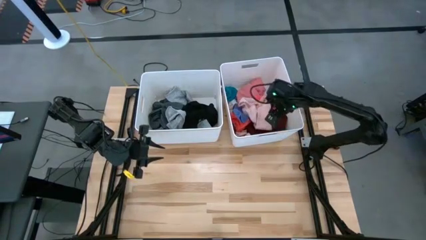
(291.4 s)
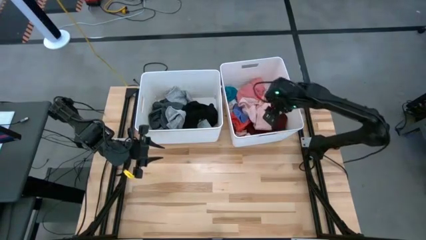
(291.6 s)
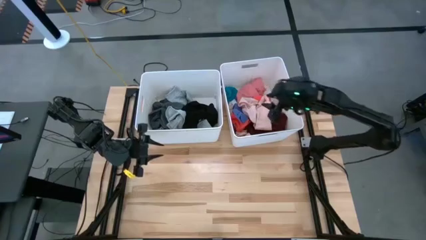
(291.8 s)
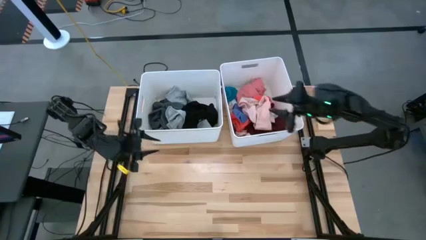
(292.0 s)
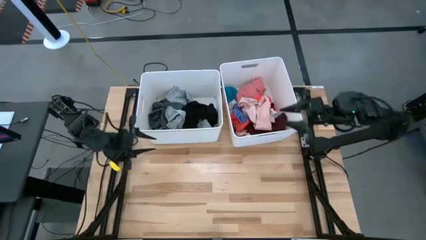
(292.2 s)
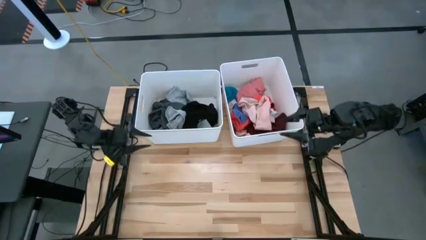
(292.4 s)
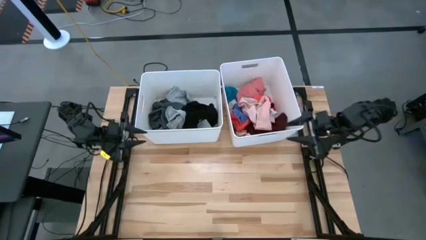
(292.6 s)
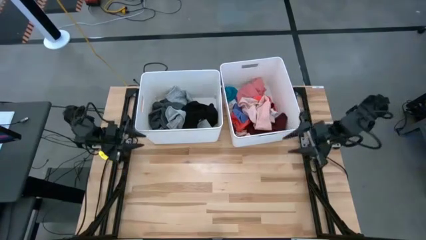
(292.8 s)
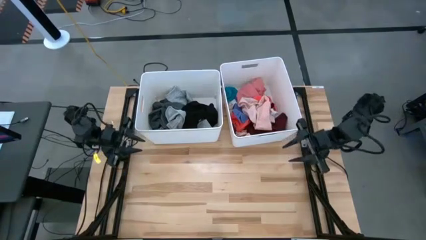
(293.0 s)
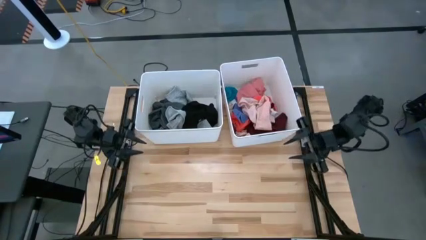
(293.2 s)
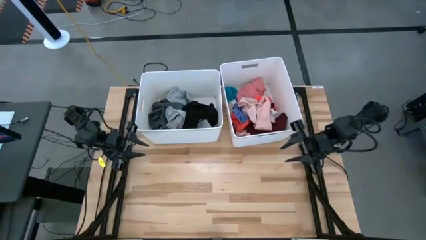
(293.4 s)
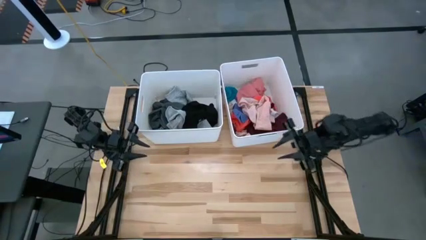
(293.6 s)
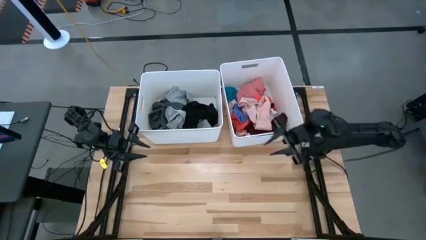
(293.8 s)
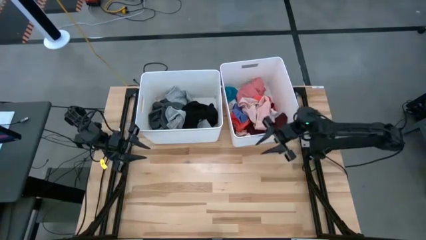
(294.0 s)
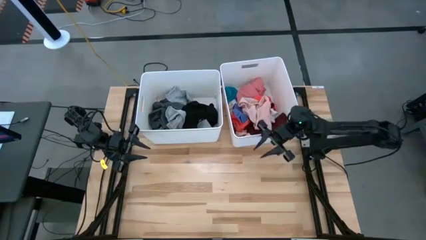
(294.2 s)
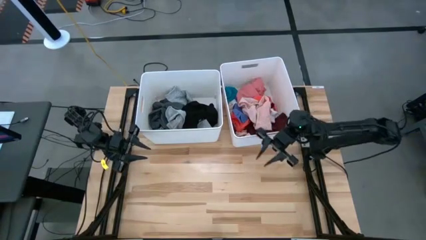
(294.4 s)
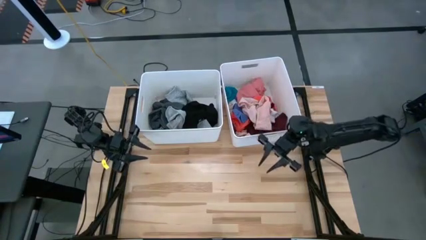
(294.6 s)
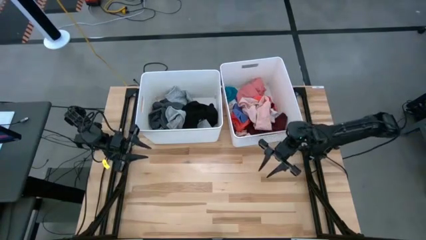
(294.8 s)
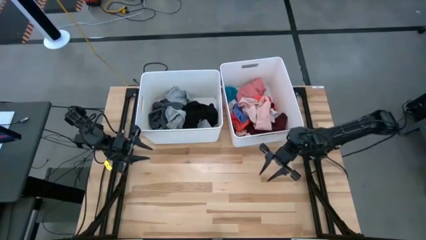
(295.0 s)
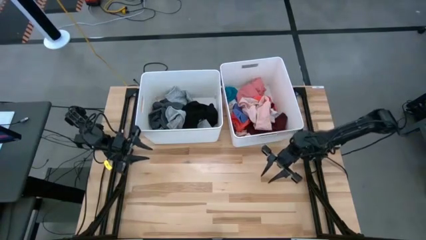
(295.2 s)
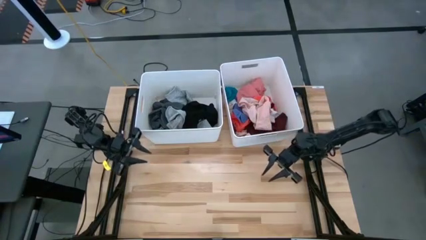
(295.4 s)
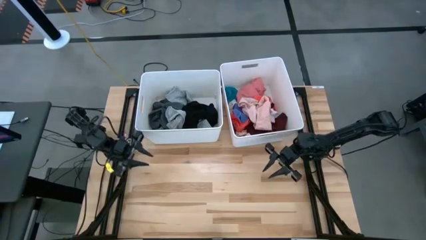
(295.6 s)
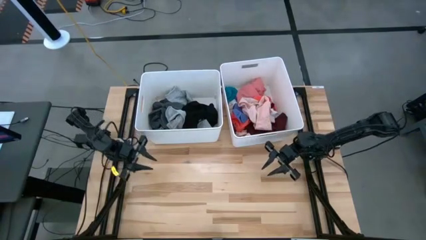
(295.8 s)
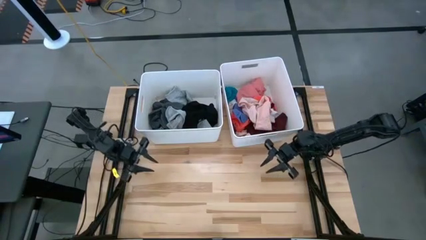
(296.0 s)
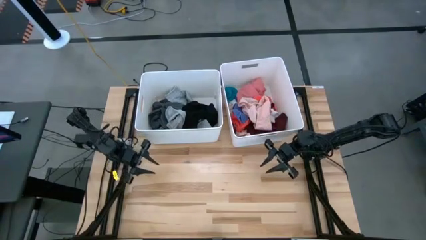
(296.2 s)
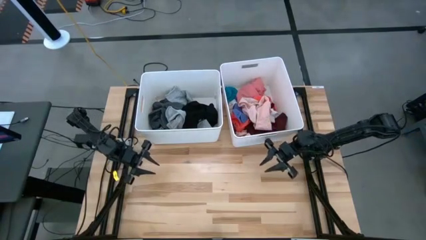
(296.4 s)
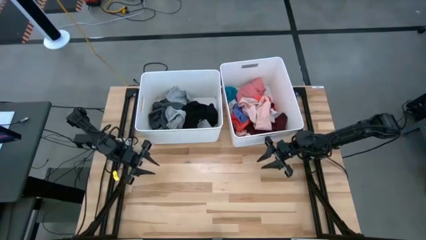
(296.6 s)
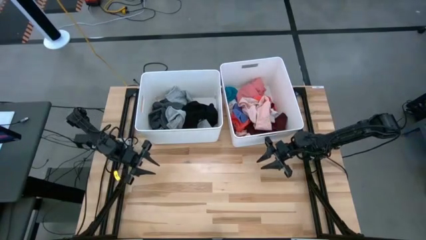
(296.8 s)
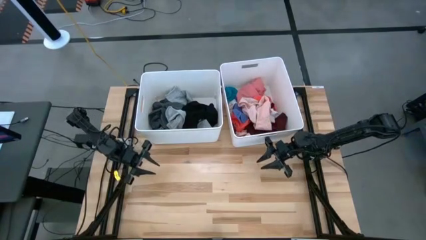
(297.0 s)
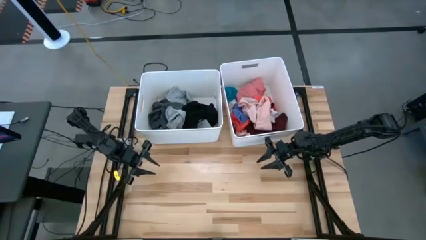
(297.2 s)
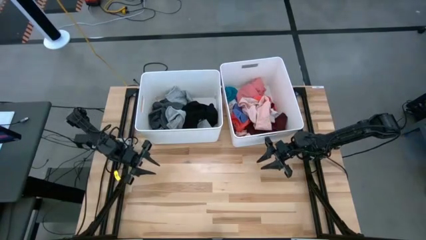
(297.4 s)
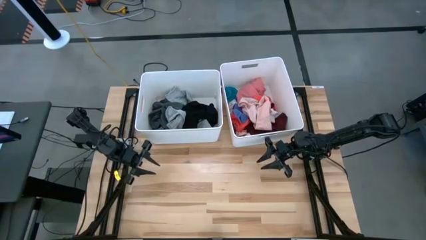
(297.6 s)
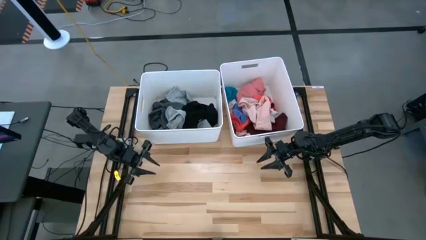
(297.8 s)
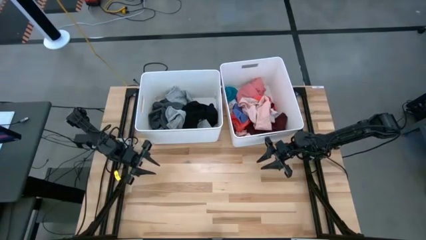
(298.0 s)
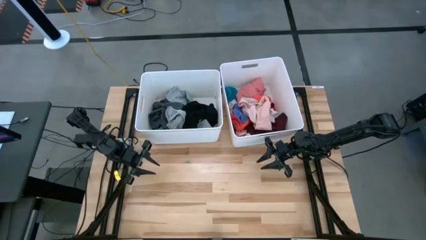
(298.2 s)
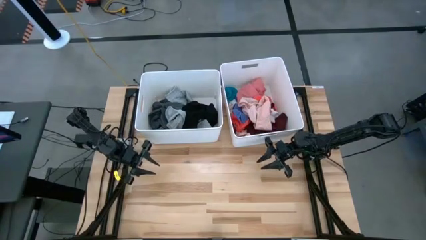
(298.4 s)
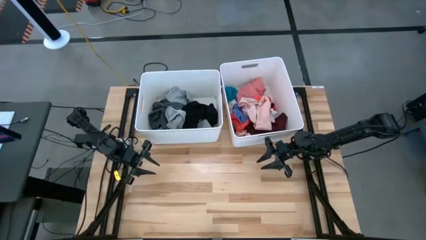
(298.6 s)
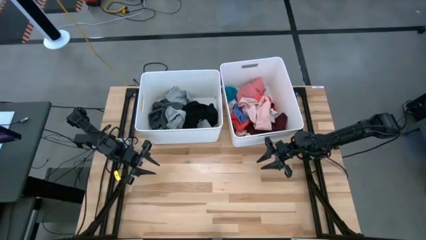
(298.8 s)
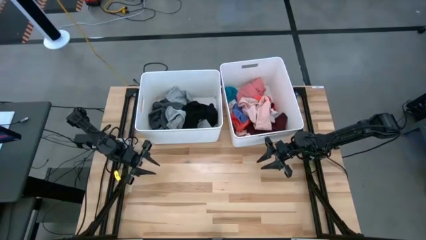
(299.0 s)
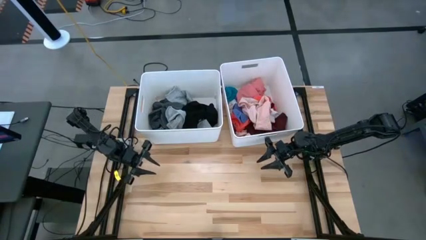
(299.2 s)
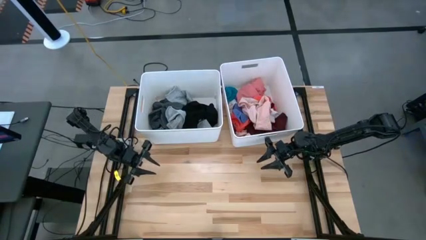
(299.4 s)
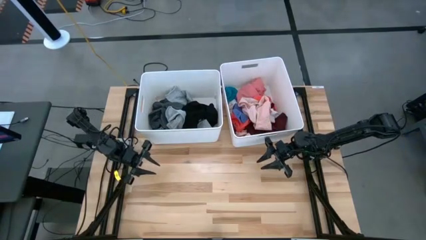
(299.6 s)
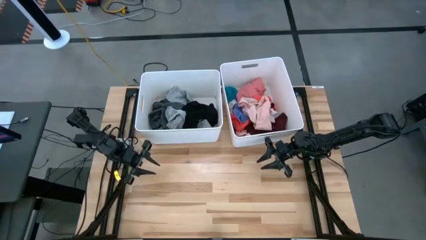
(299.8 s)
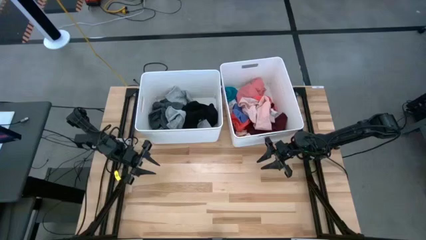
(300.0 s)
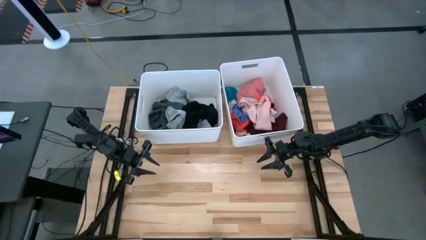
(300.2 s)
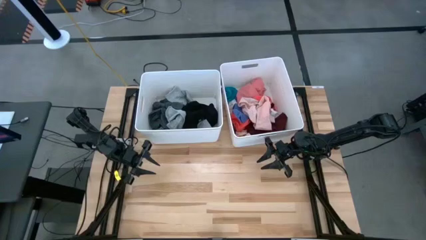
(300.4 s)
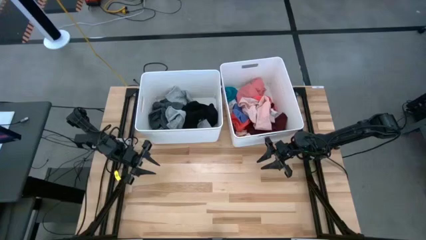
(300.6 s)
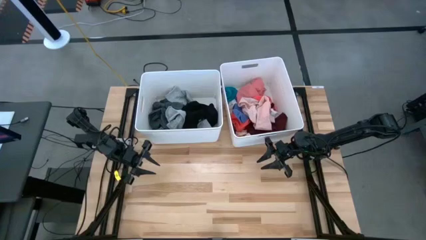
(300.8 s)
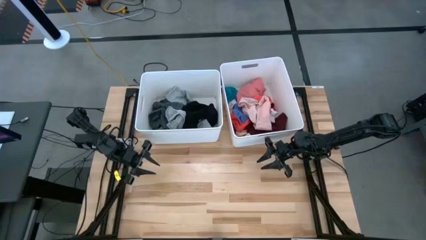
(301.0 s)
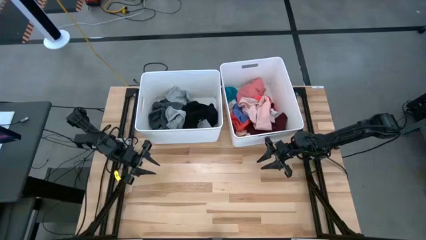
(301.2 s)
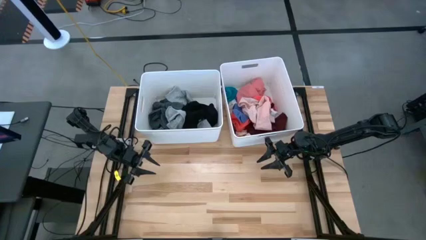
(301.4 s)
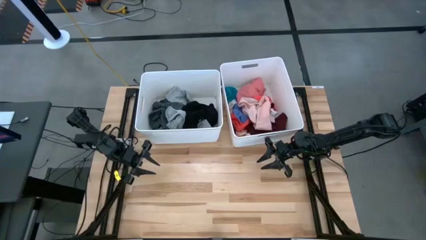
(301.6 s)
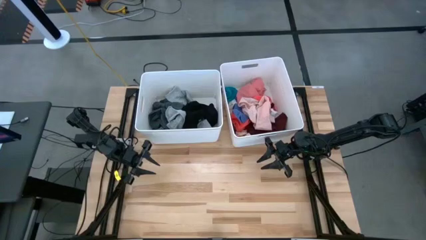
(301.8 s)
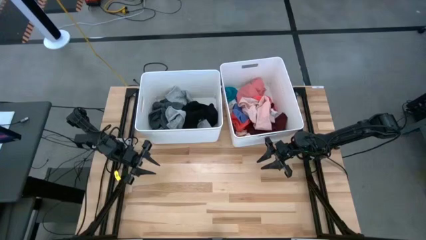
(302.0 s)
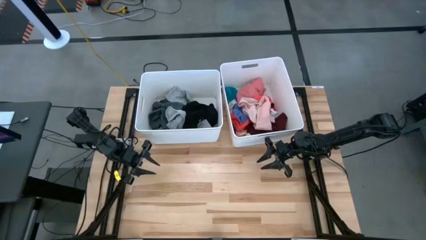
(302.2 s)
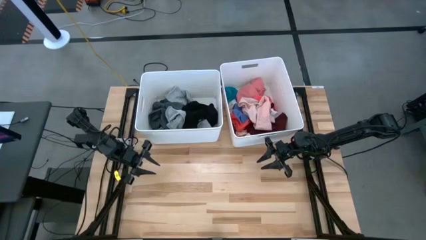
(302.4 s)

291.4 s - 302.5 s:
Task: Sort clothes
Return to Home Position
